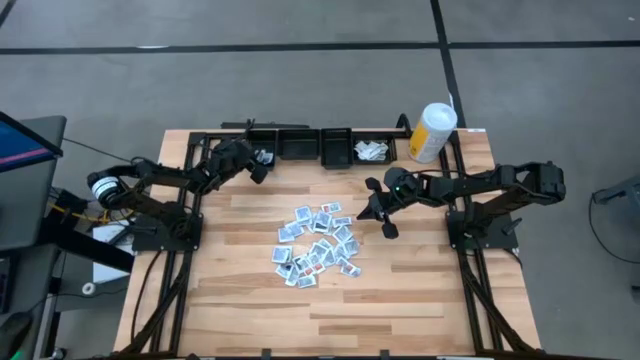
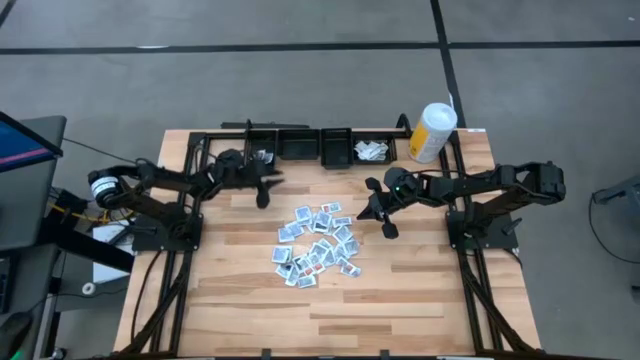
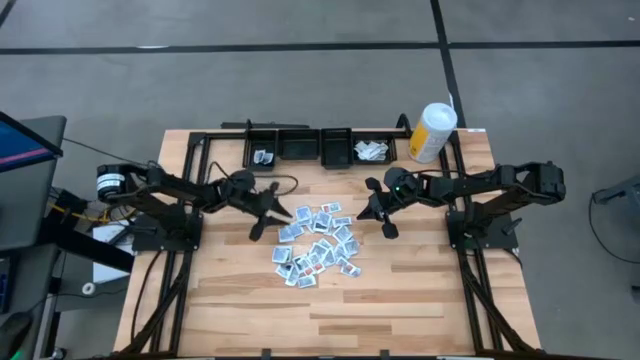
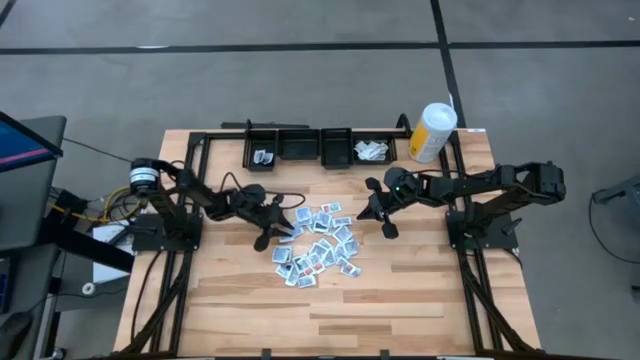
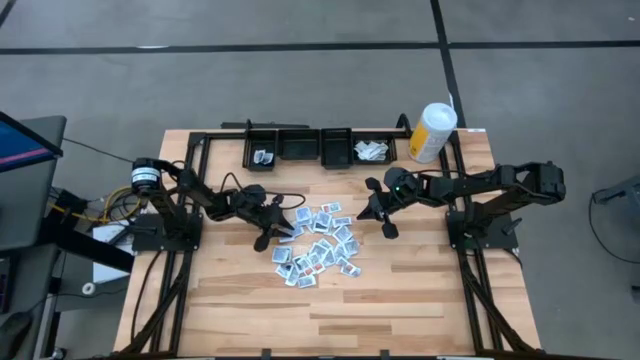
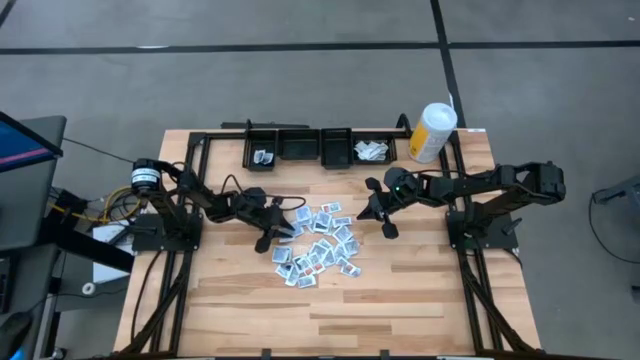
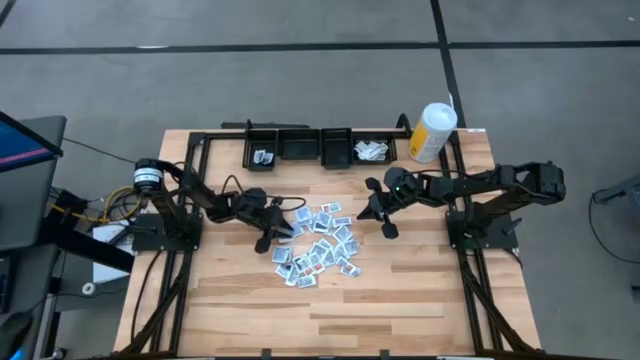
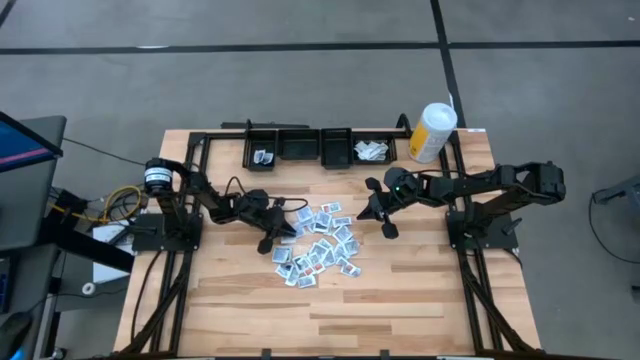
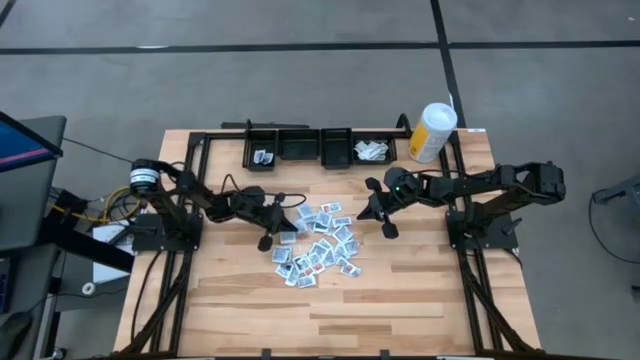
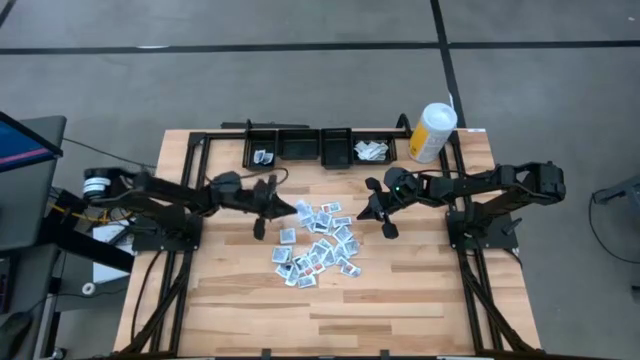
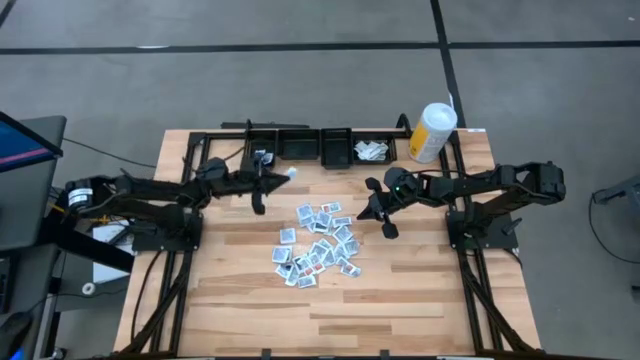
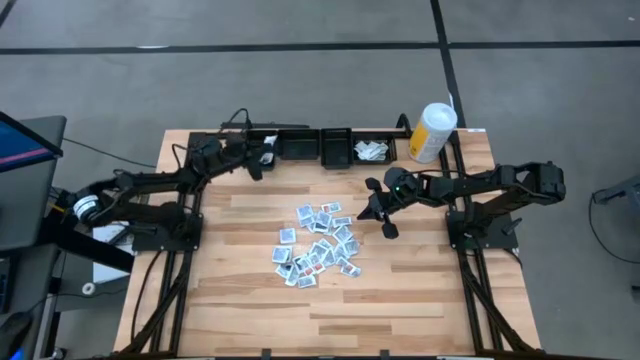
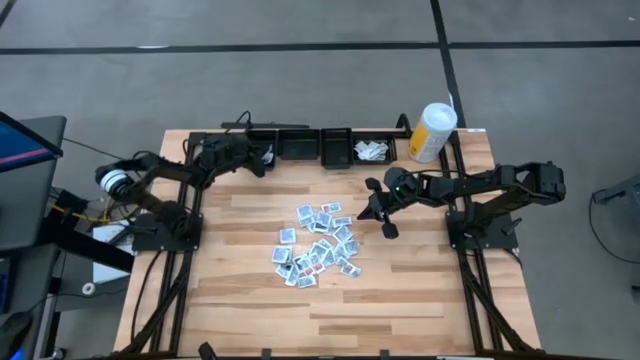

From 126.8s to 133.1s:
Task: Pick & Place First Aid Supplies
Put the blue alcohol pad into the left black bin

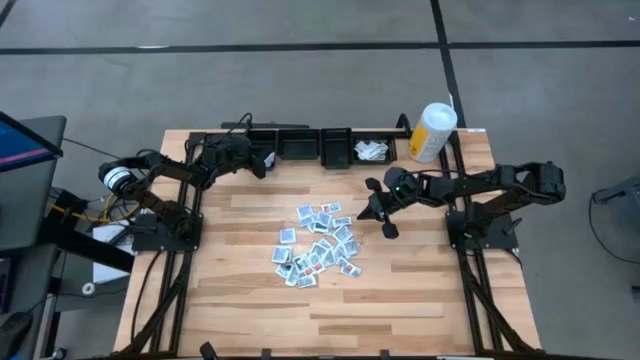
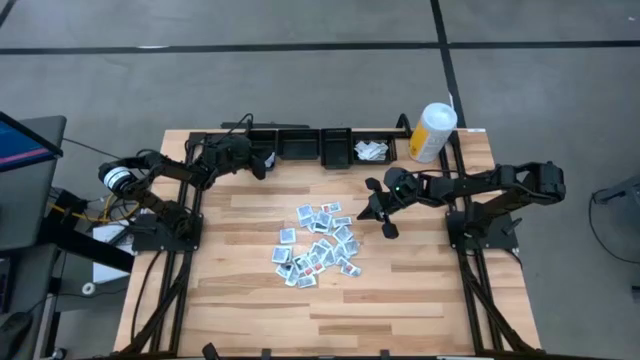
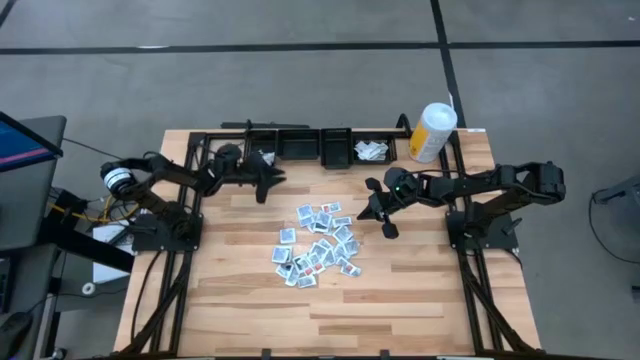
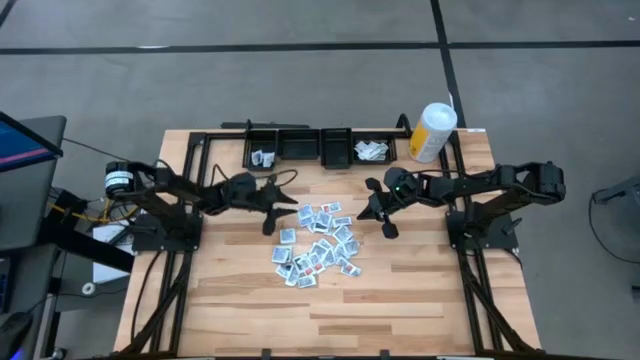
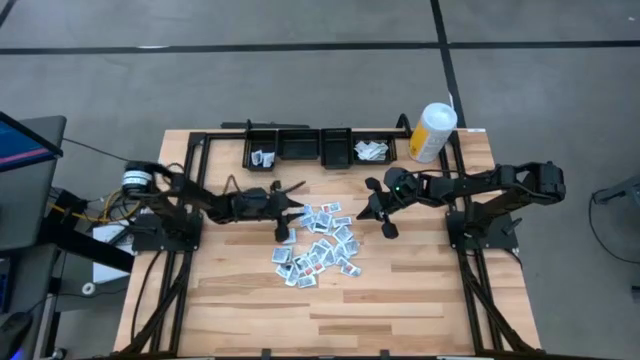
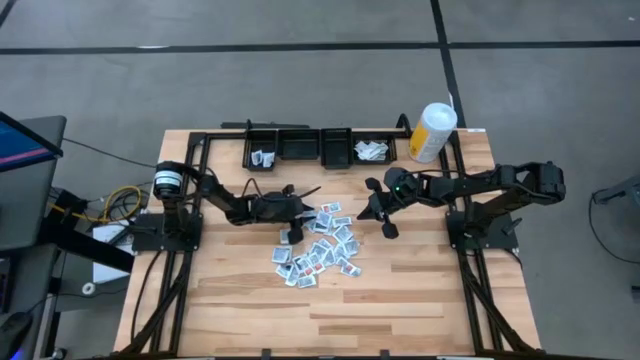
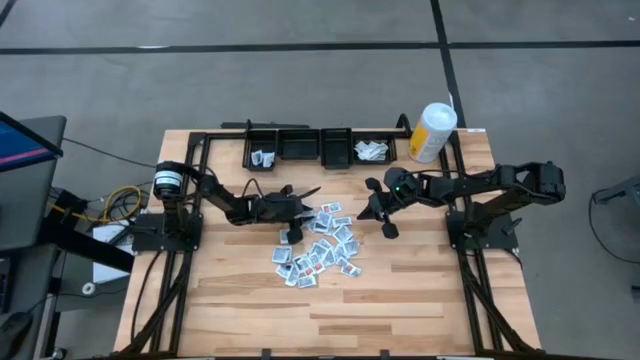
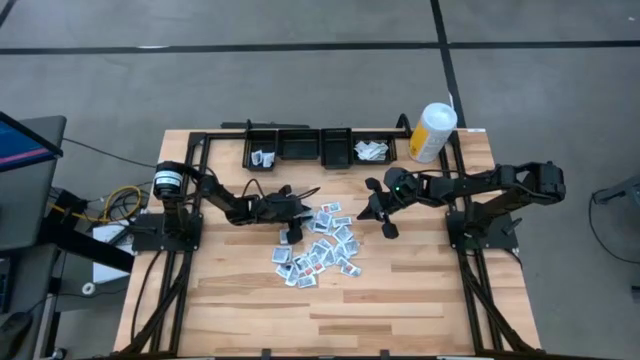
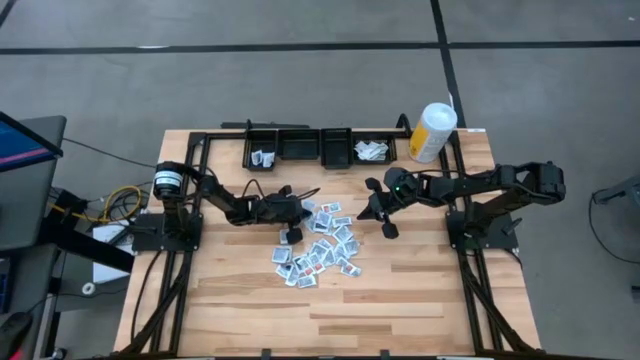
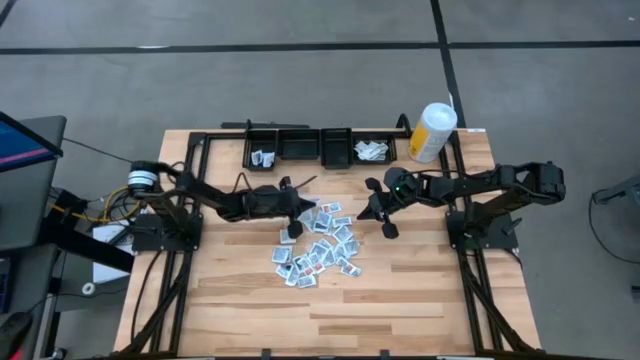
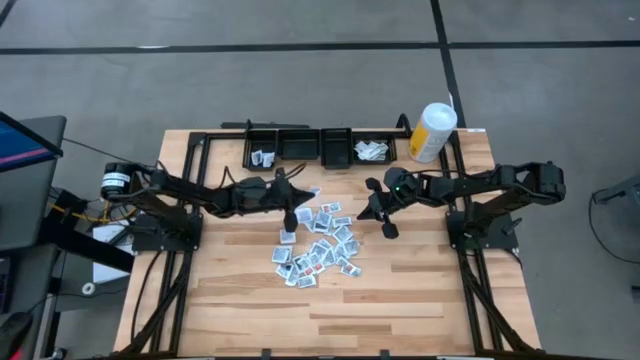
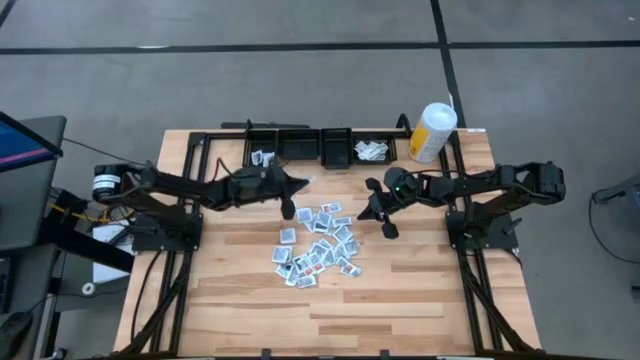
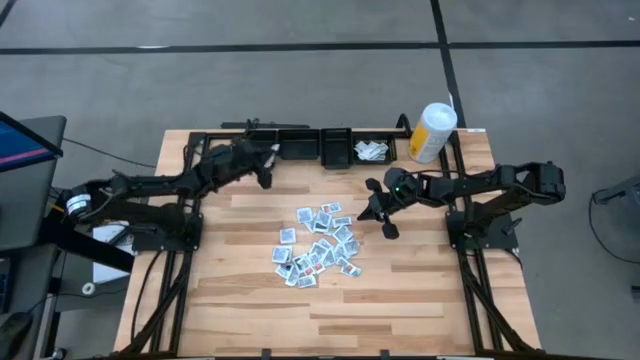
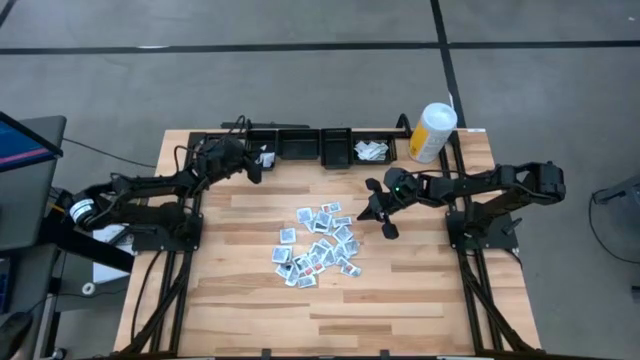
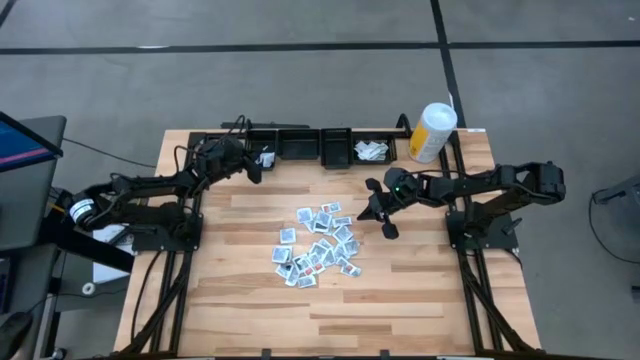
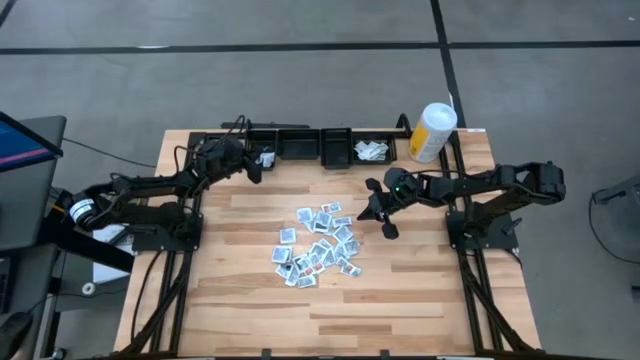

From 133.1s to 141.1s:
Put the blue alcohol pad into the left black bin

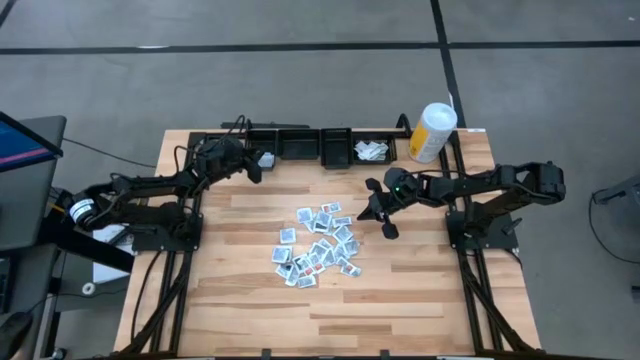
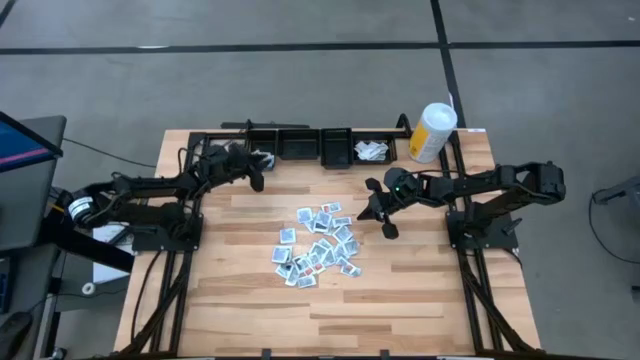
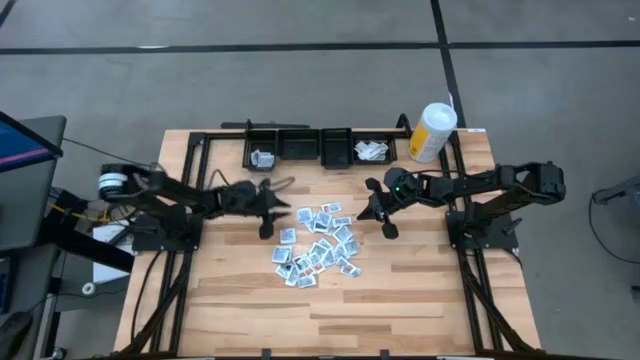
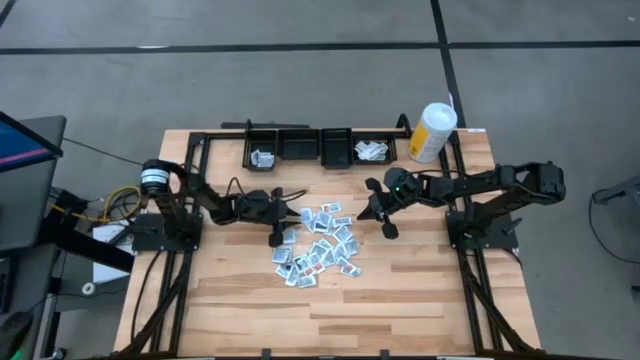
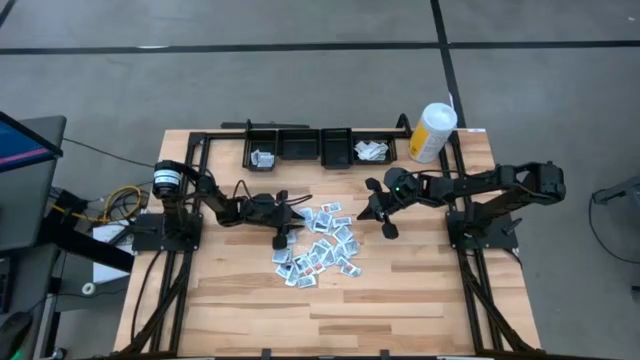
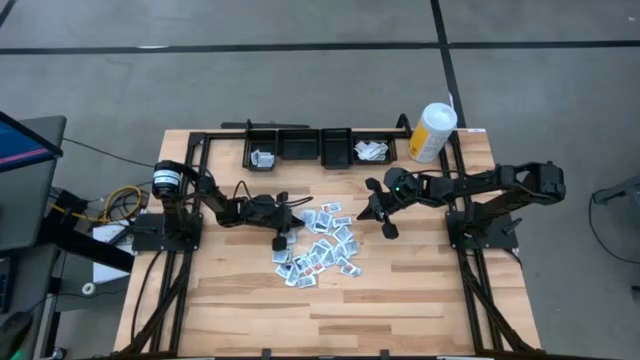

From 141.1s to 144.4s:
Put the blue alcohol pad into the left black bin

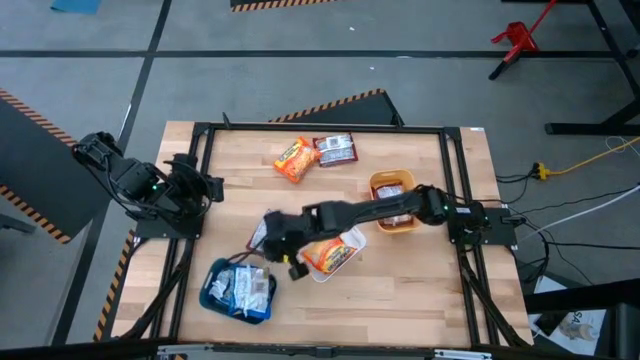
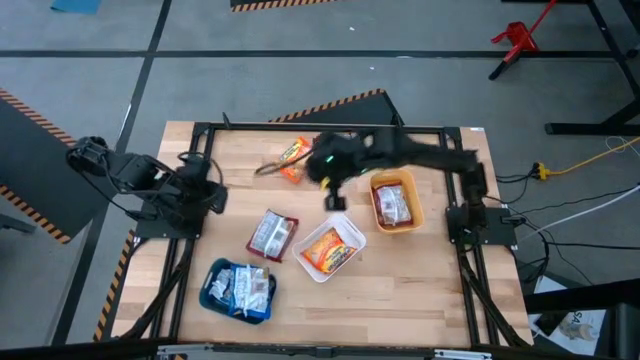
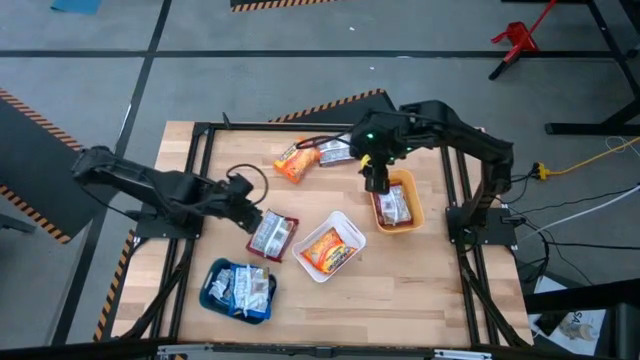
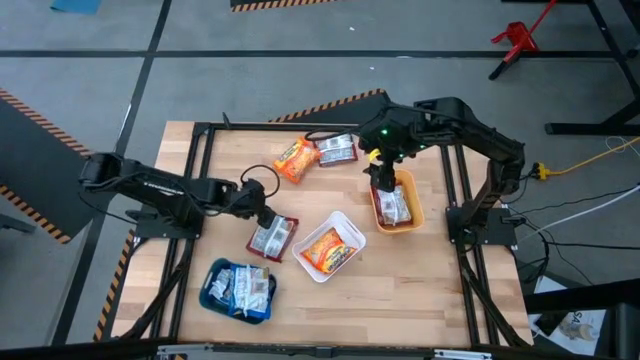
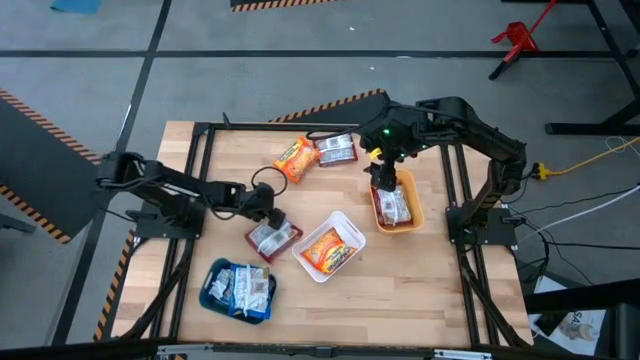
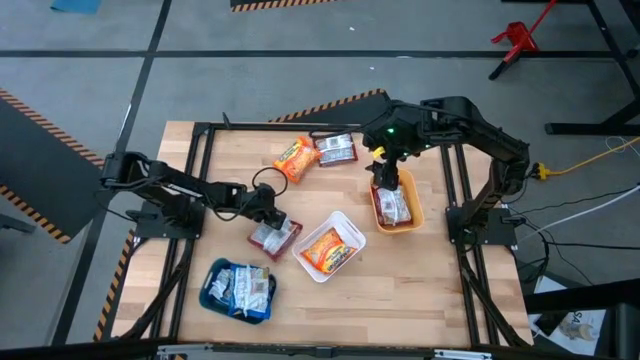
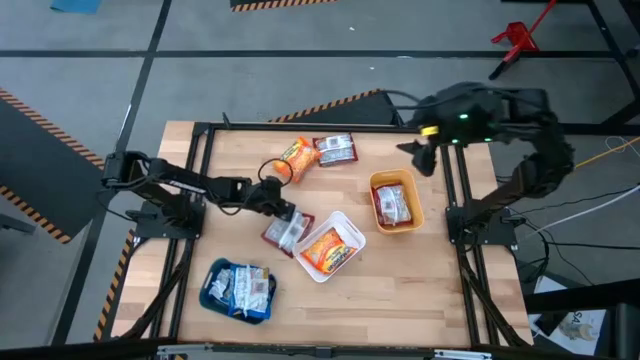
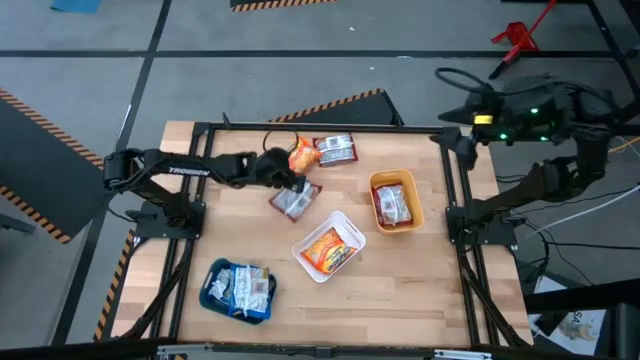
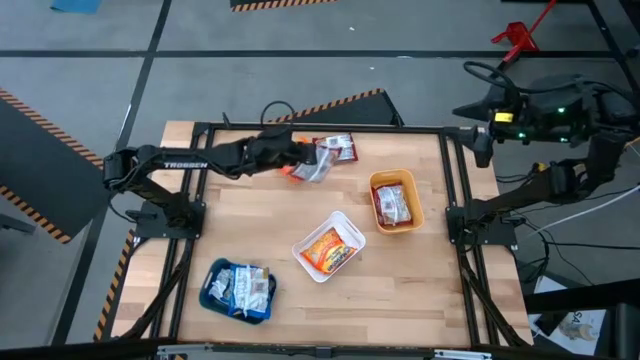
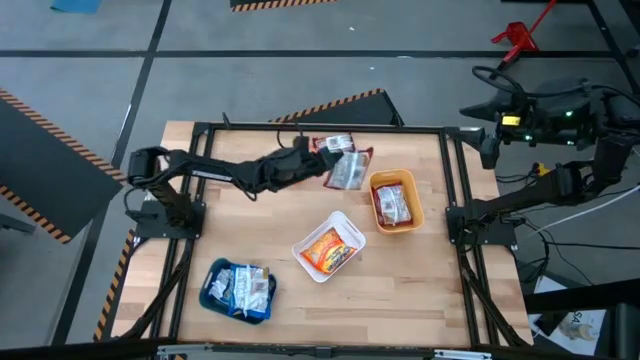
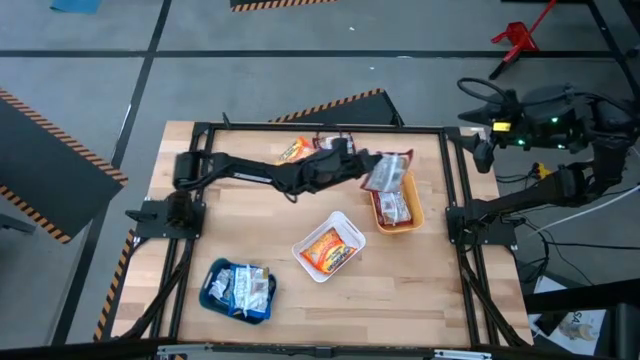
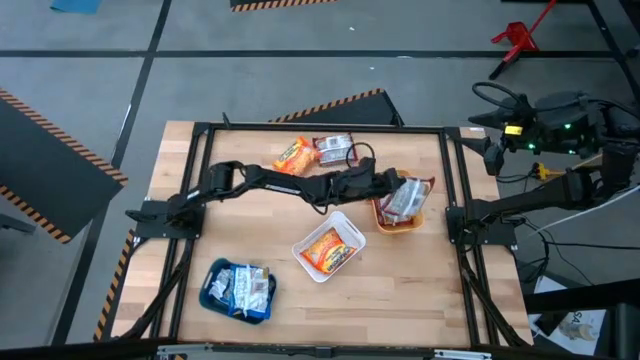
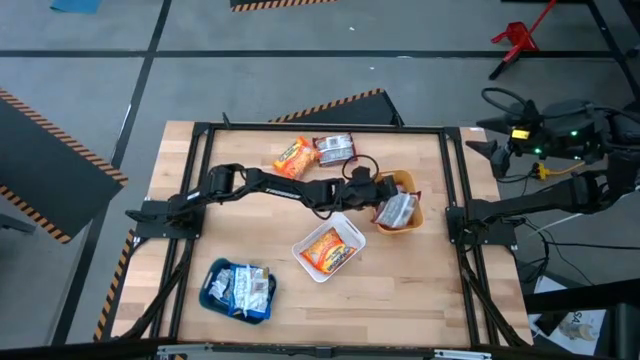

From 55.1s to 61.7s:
Task: Sort Maruchan noodles
Put the bottom red noodle pack into the yellow bin
